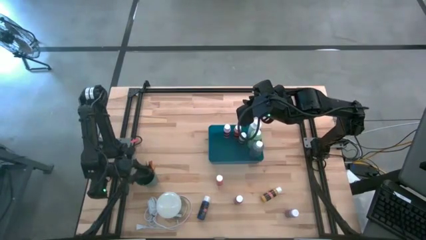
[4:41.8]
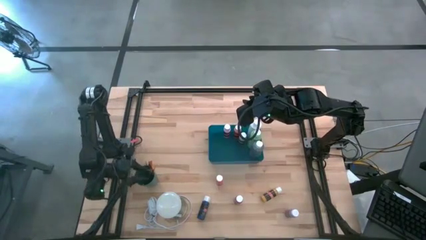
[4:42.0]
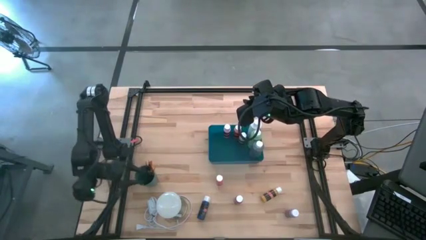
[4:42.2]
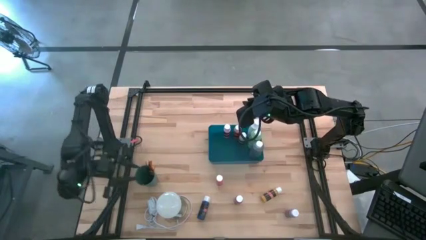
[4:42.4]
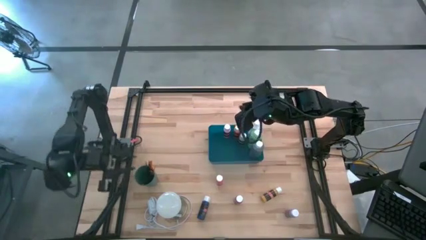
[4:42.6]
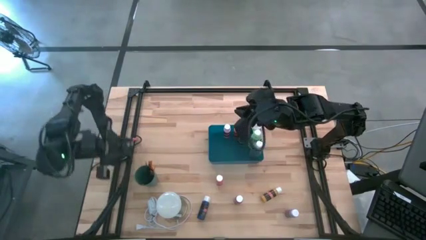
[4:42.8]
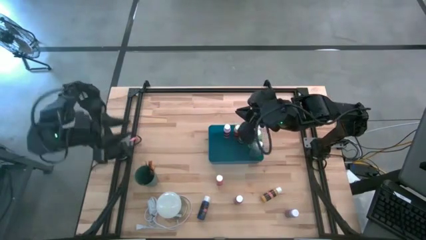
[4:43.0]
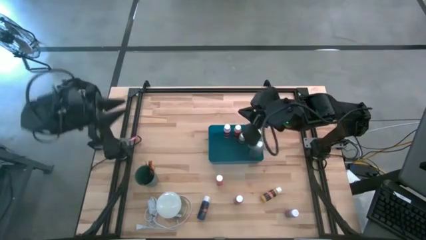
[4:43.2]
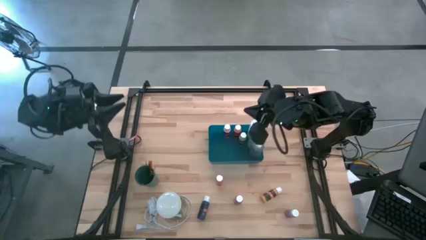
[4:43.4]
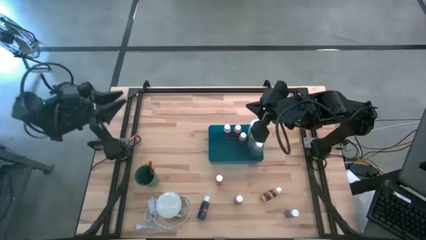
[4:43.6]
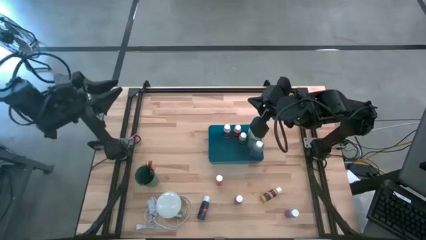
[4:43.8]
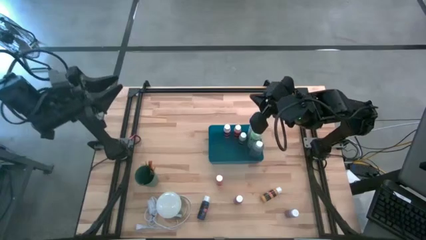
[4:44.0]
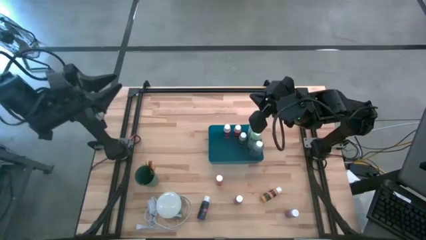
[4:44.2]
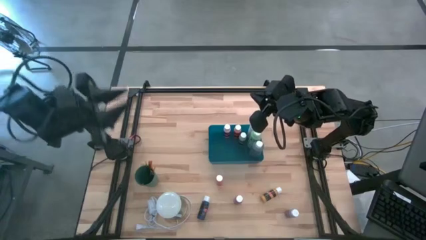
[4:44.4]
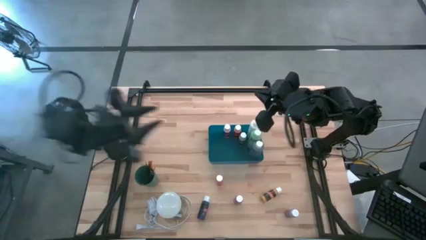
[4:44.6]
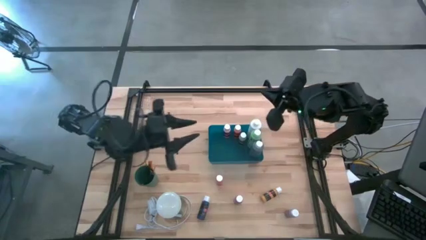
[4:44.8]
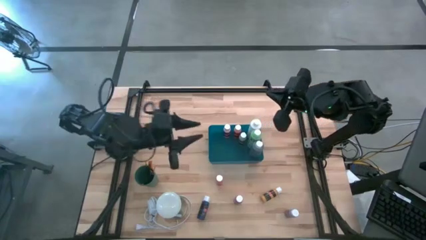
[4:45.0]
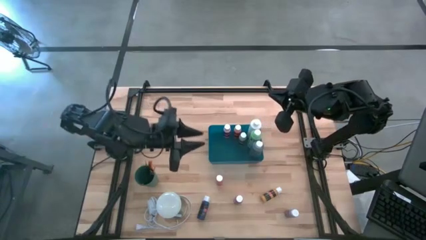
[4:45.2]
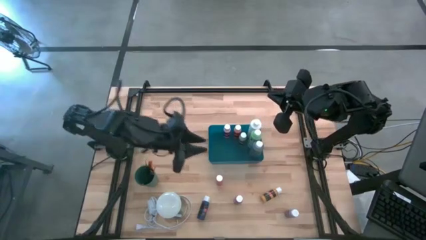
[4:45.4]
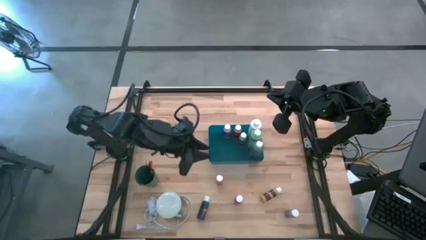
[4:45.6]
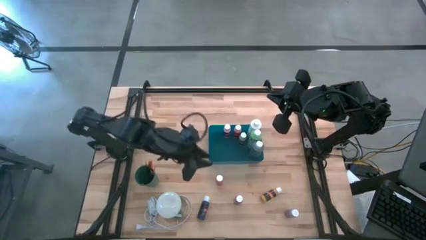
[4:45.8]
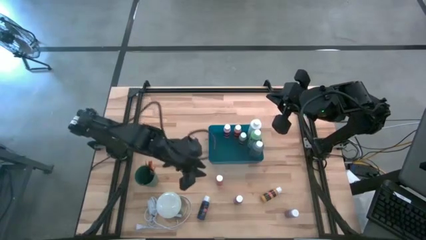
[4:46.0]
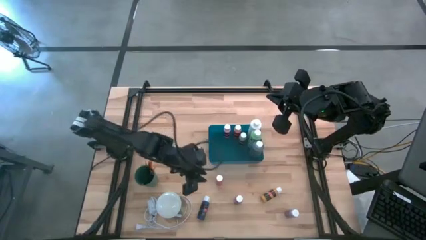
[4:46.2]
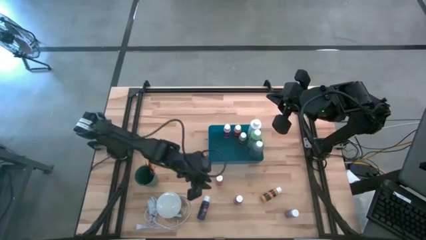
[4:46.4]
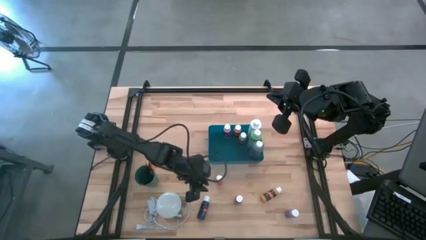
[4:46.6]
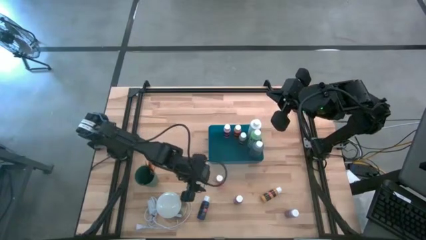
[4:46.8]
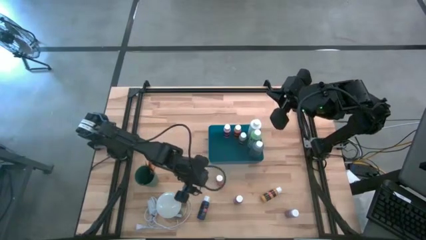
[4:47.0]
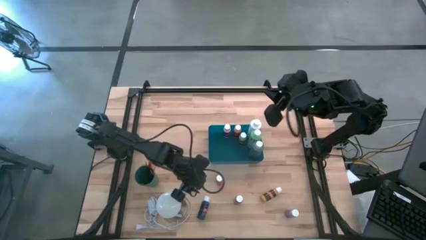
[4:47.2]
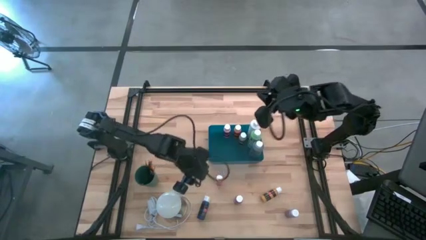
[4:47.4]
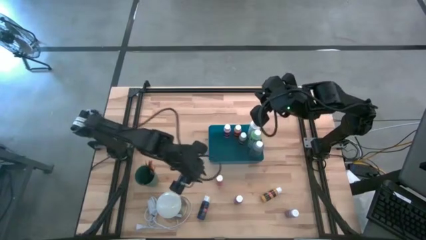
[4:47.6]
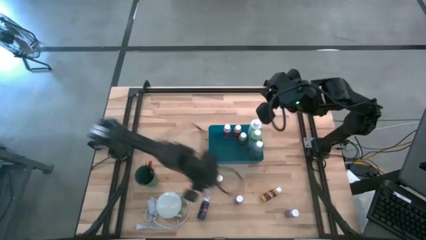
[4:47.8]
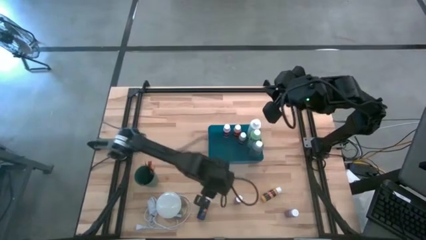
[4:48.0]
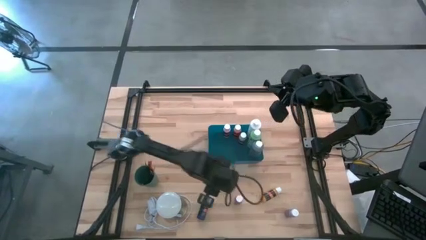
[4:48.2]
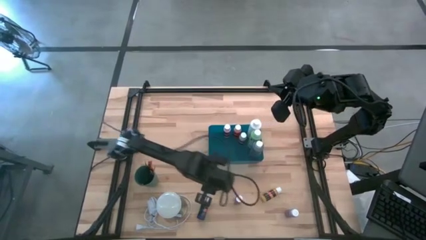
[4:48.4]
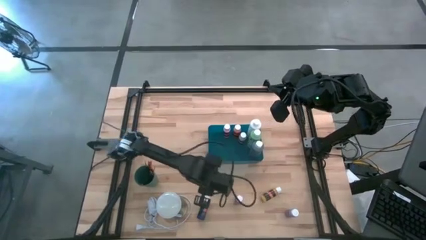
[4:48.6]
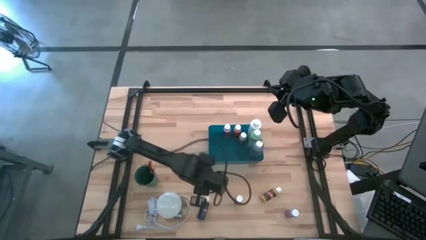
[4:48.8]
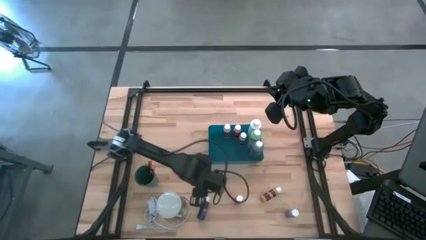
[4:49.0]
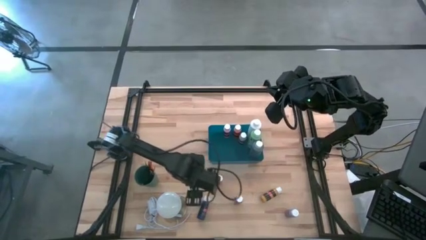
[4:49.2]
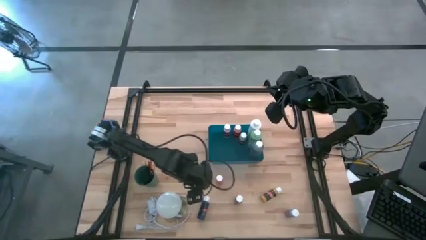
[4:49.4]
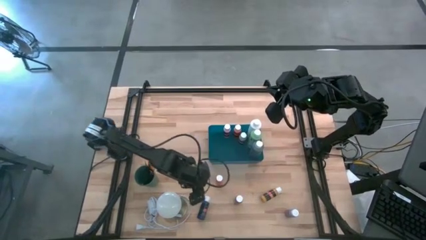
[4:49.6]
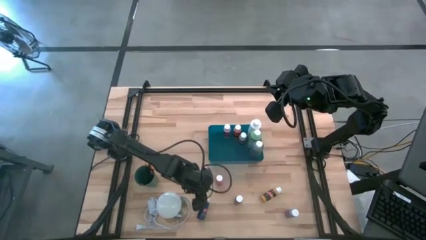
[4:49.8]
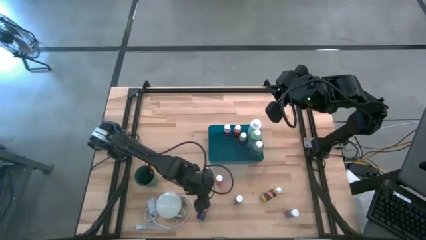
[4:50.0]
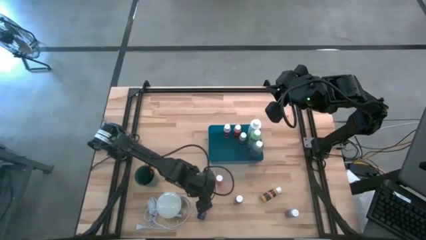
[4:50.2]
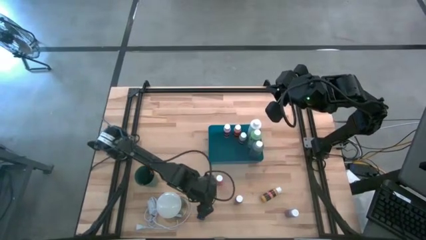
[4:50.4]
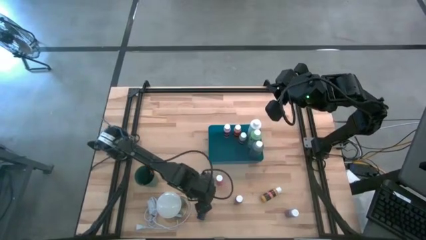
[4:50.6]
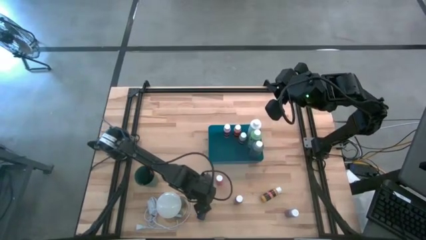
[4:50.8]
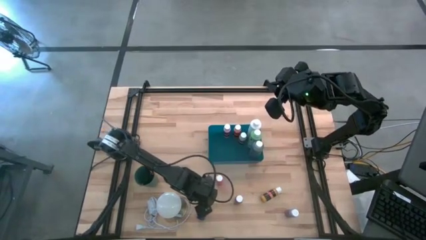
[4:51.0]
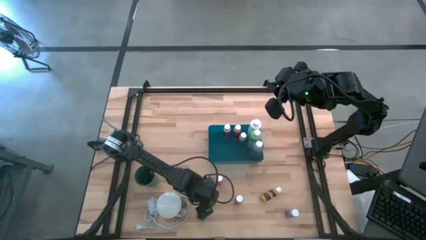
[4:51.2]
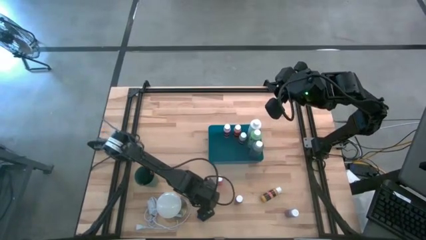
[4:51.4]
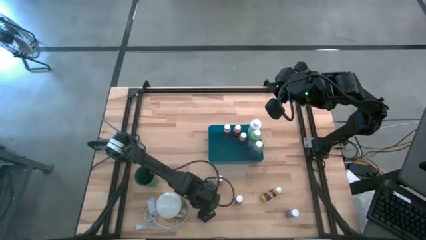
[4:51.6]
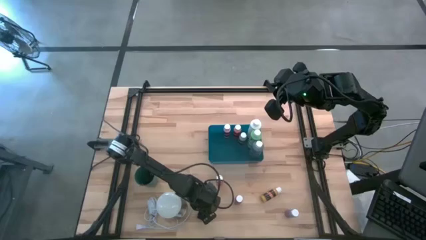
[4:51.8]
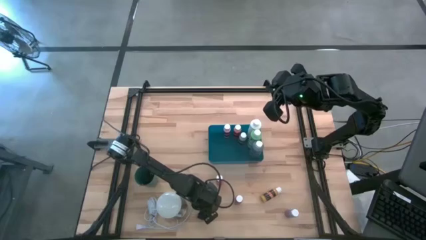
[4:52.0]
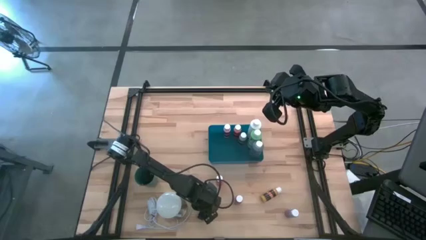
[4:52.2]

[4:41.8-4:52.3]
Task: Pick & Place Paint Supplies
Put the blue paint bottle into the blue bin

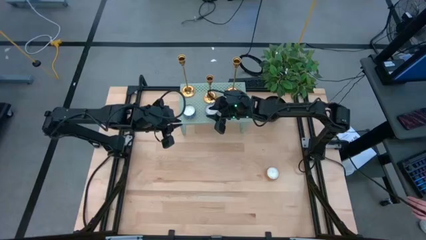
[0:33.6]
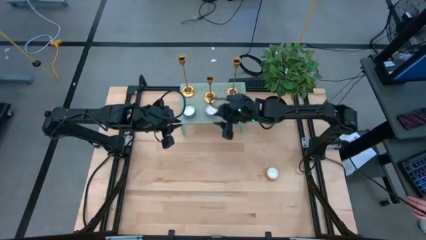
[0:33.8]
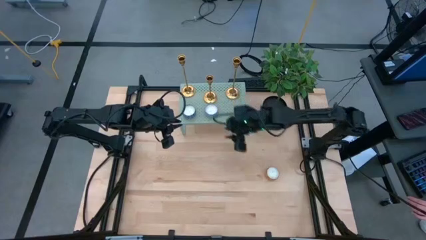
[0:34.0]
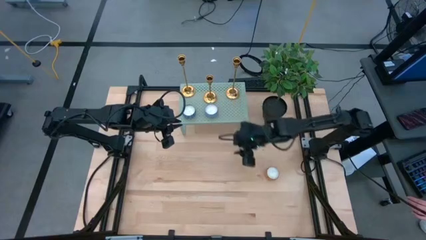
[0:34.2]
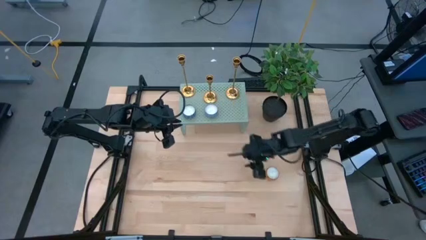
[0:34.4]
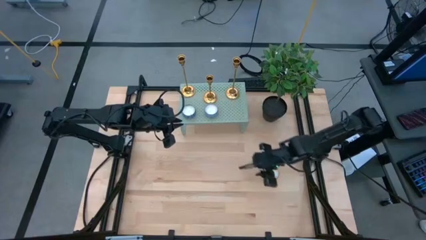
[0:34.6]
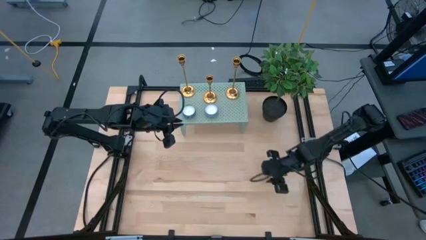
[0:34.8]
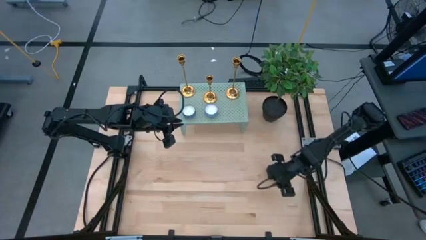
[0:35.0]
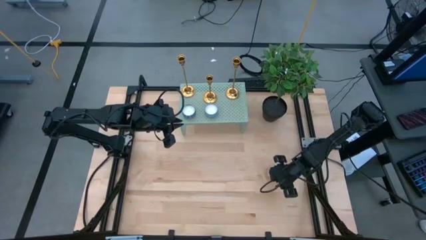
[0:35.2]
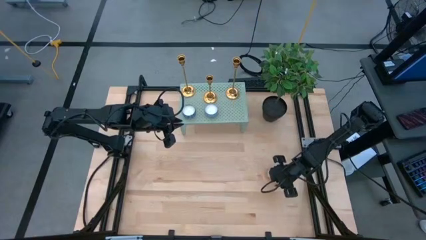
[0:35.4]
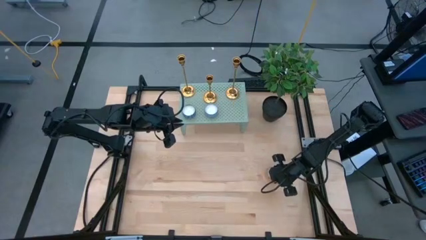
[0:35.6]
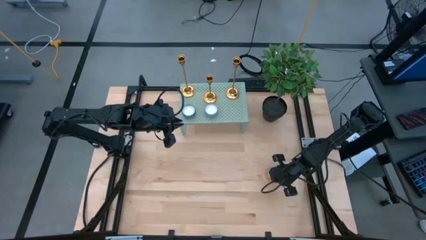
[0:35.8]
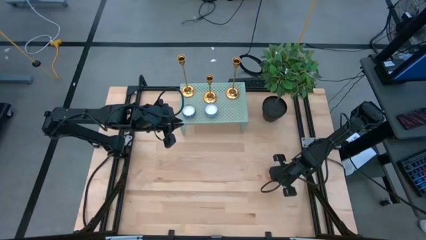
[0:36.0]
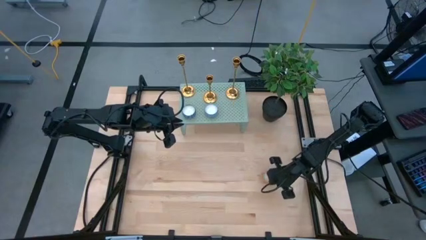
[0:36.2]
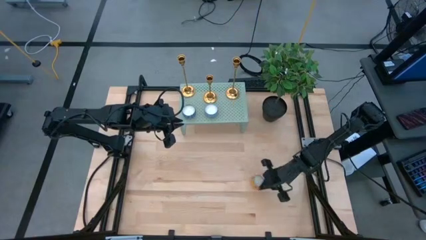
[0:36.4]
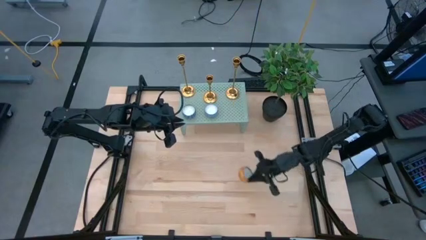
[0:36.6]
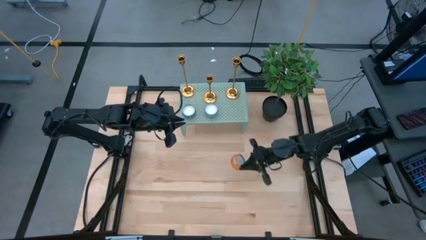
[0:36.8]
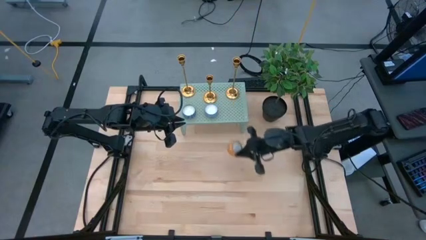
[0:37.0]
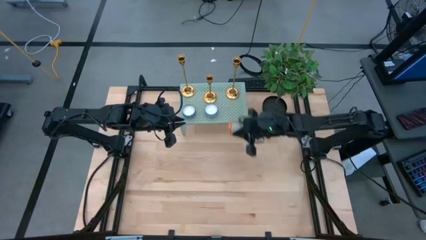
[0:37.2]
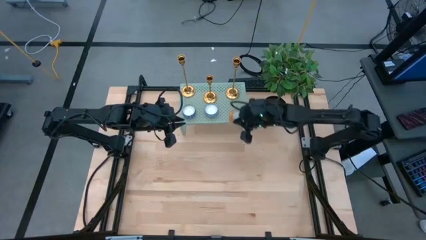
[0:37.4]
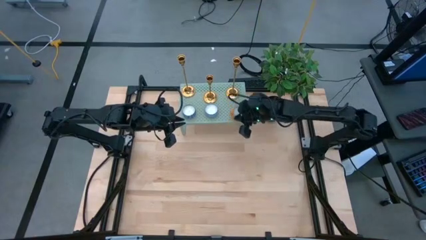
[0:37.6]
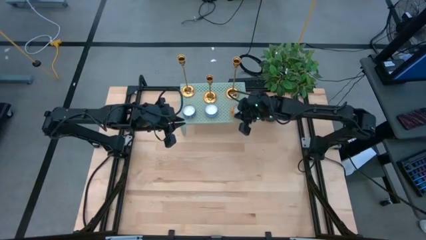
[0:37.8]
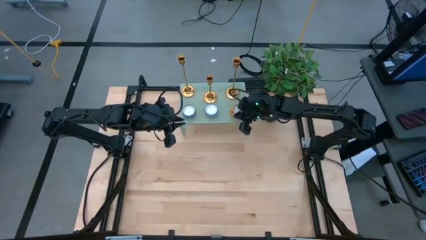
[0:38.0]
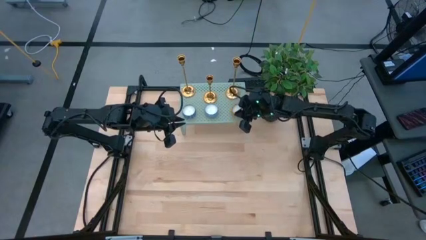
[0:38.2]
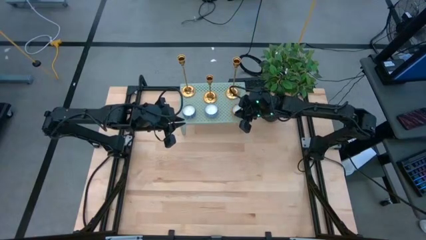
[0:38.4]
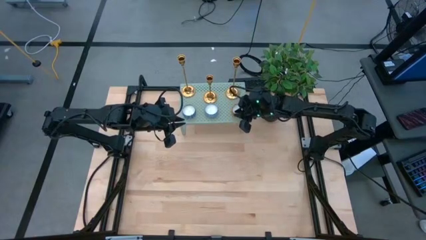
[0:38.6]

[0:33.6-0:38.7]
Task: Pick & Place candle stick holders
Put the yellow scented candle on the shelf

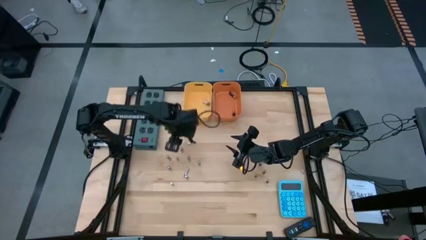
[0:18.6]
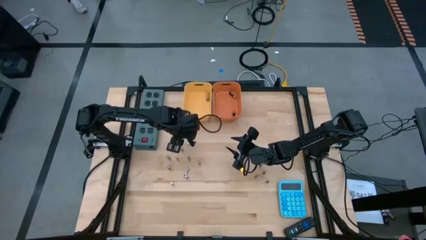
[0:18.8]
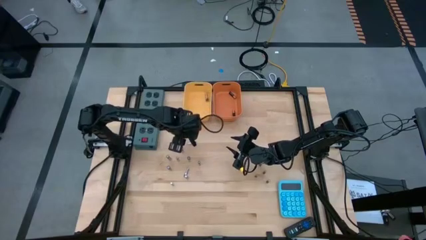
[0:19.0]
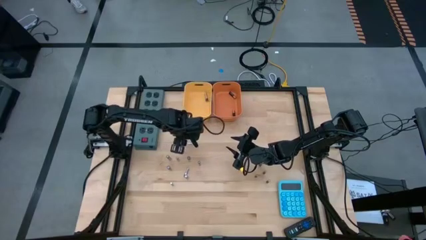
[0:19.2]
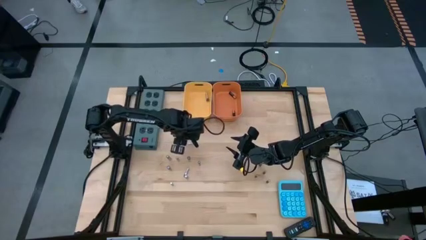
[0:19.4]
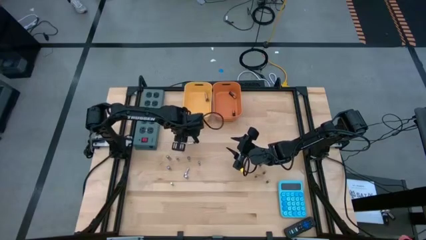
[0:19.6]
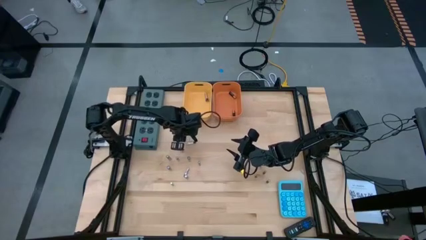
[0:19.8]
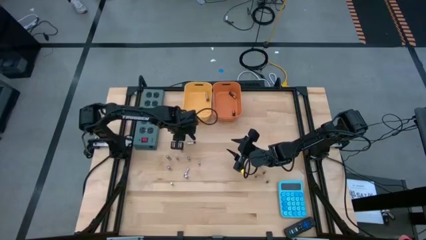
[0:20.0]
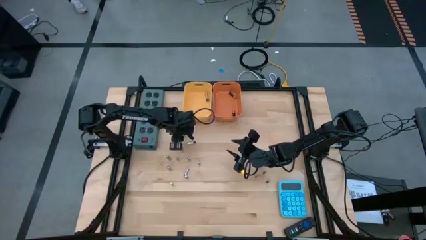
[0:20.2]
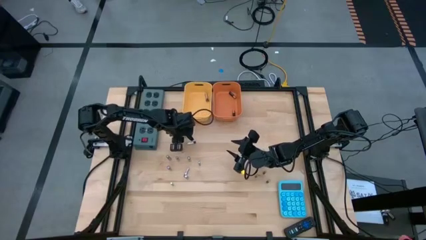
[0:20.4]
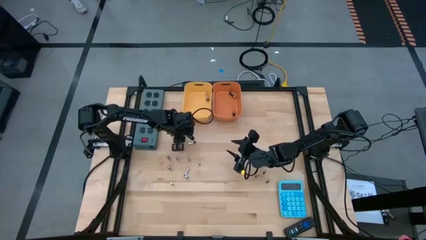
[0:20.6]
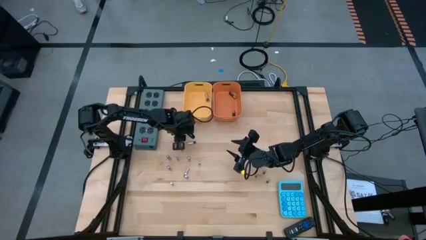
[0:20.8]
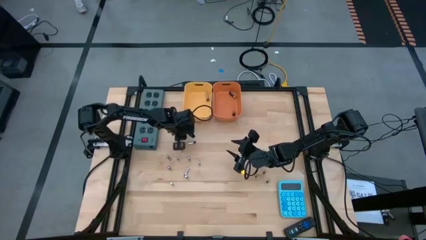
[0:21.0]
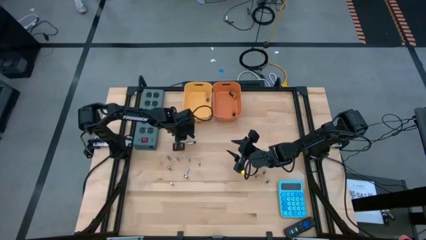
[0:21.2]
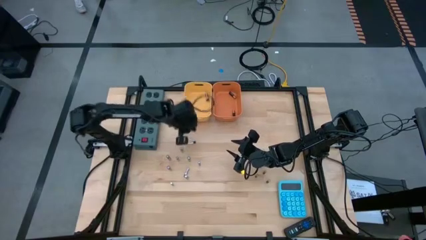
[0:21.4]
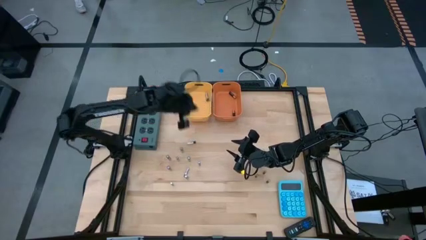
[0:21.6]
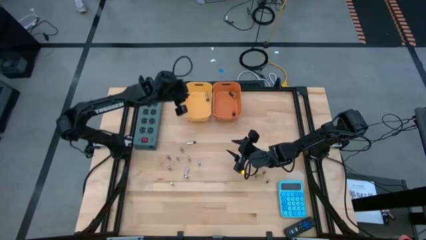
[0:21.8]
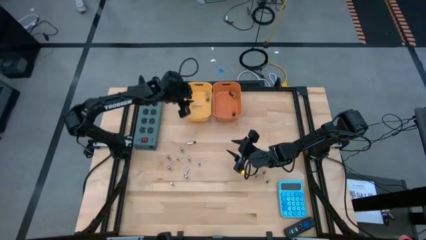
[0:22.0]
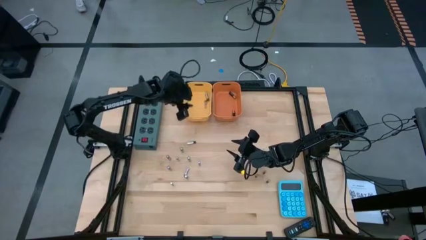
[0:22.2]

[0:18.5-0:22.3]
Task: Sort batteries
Put the silver battery into the yellow bin
